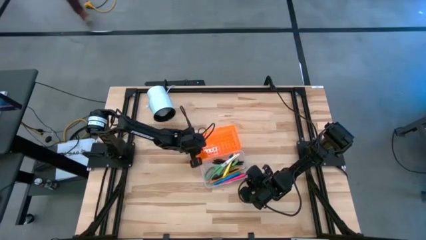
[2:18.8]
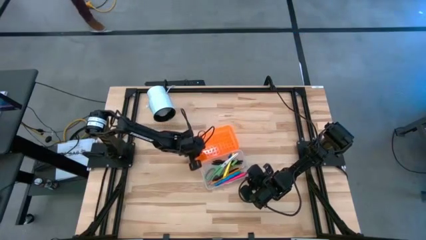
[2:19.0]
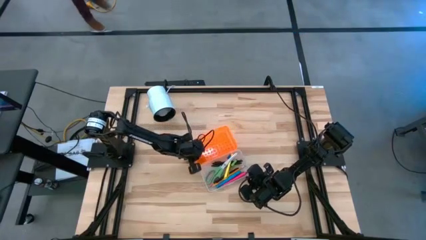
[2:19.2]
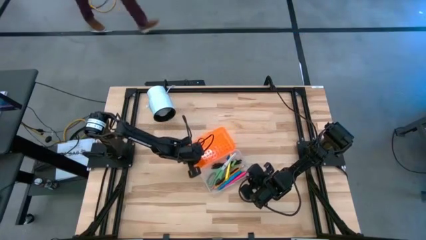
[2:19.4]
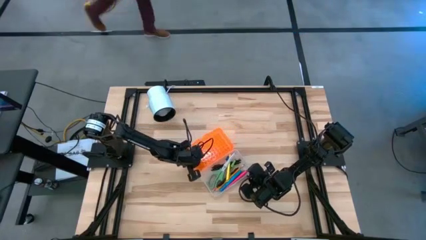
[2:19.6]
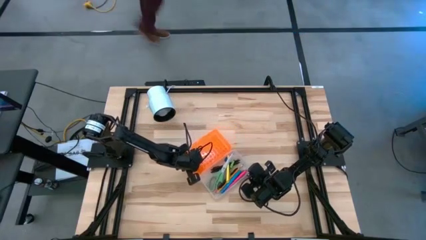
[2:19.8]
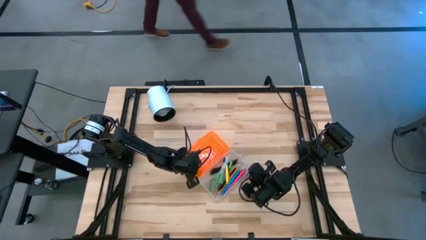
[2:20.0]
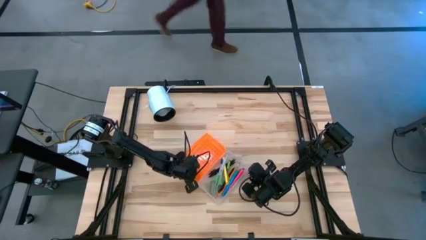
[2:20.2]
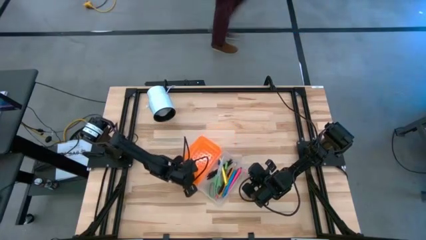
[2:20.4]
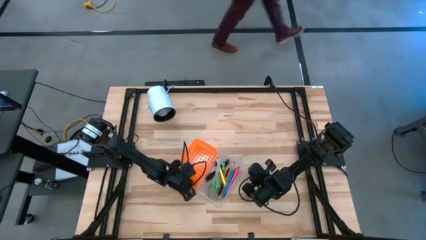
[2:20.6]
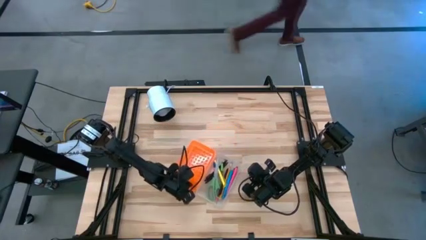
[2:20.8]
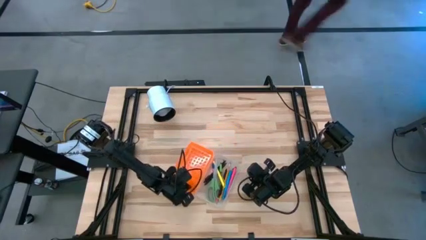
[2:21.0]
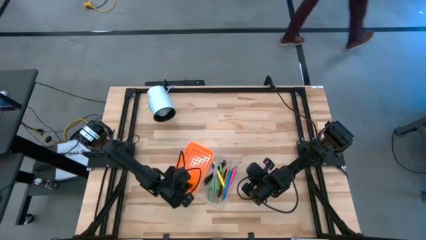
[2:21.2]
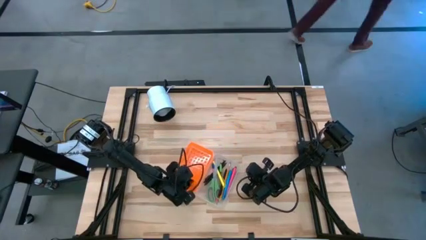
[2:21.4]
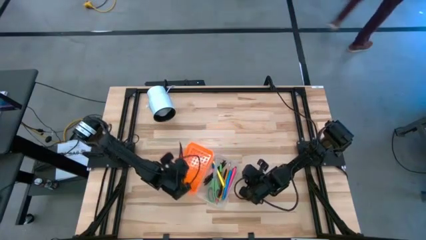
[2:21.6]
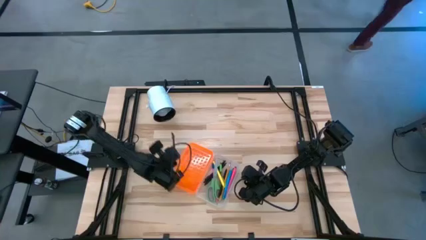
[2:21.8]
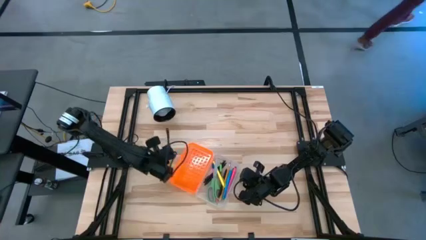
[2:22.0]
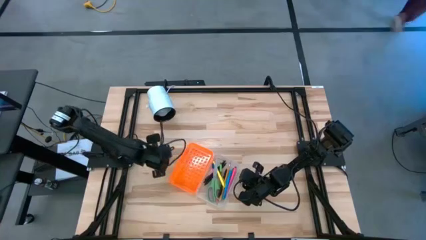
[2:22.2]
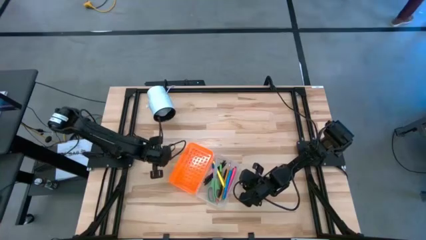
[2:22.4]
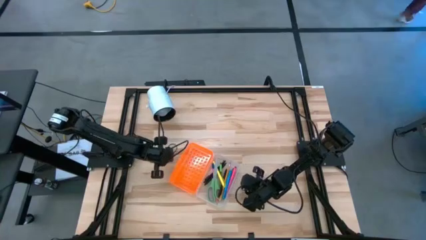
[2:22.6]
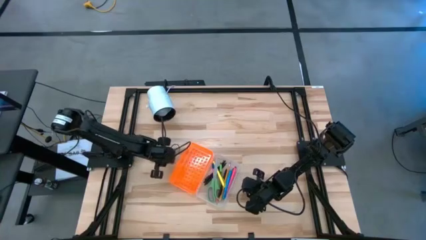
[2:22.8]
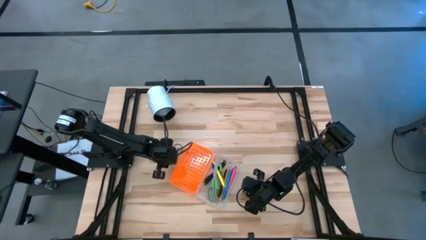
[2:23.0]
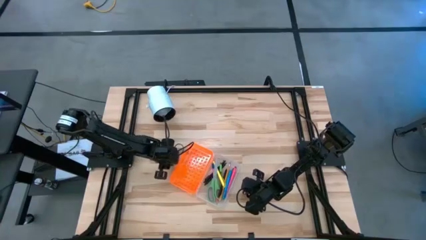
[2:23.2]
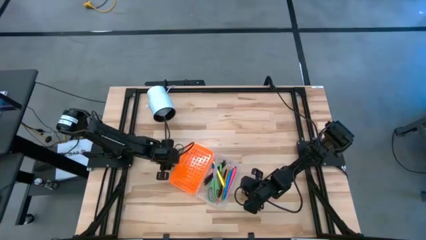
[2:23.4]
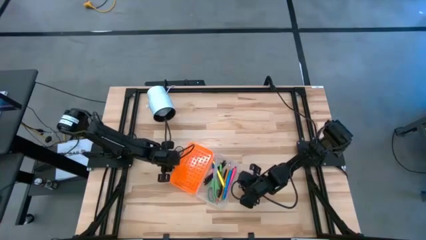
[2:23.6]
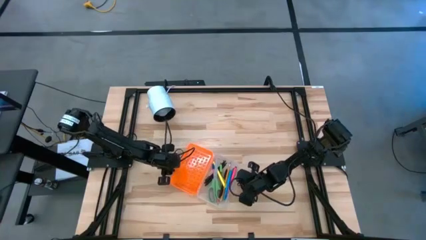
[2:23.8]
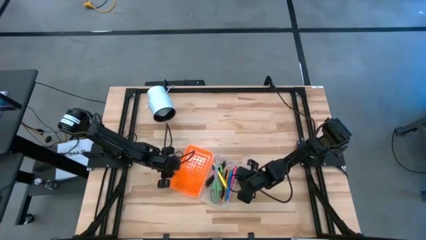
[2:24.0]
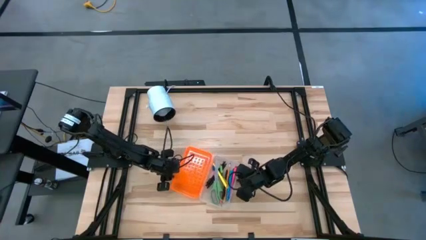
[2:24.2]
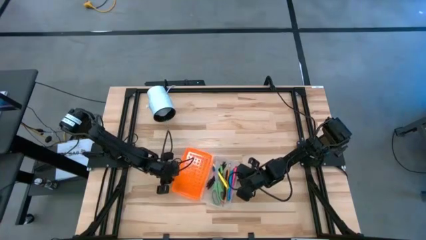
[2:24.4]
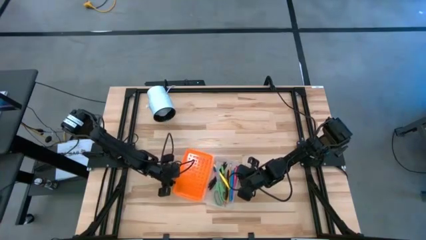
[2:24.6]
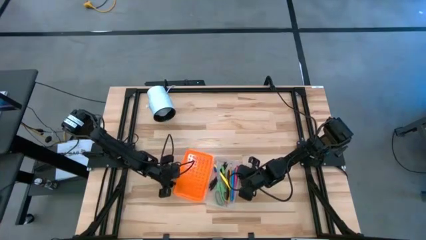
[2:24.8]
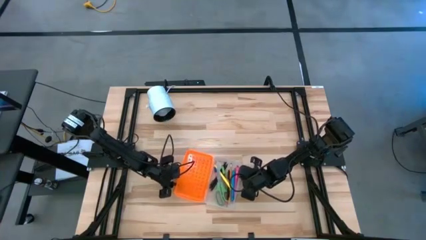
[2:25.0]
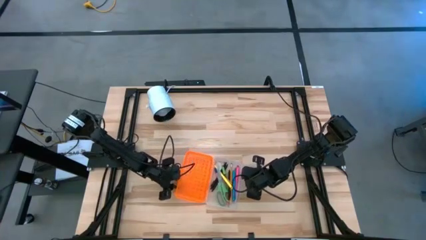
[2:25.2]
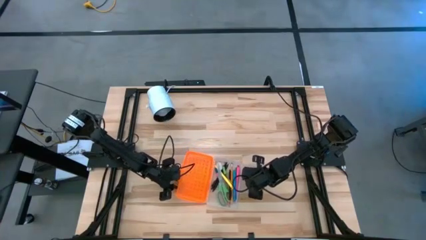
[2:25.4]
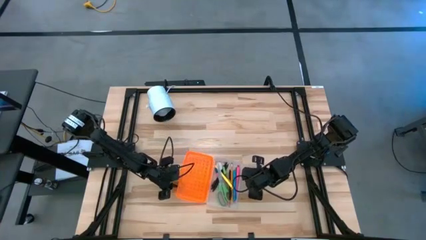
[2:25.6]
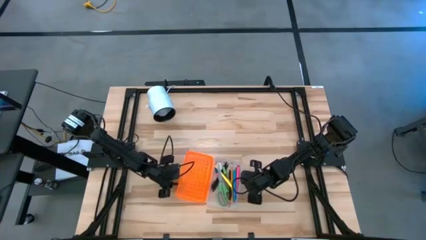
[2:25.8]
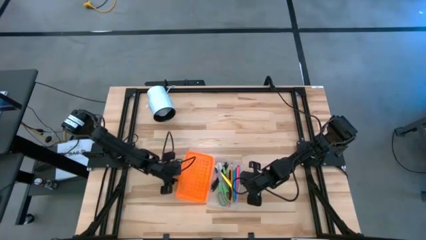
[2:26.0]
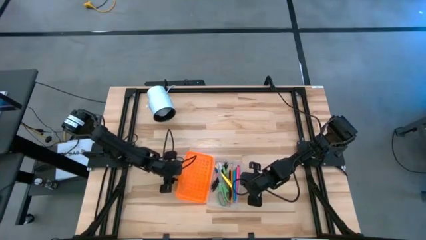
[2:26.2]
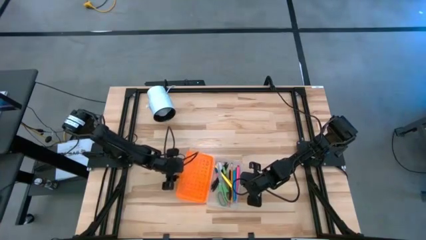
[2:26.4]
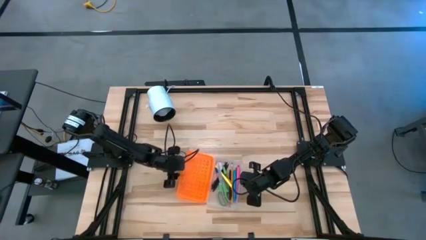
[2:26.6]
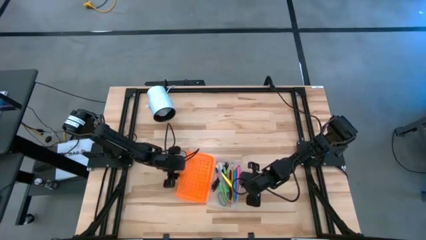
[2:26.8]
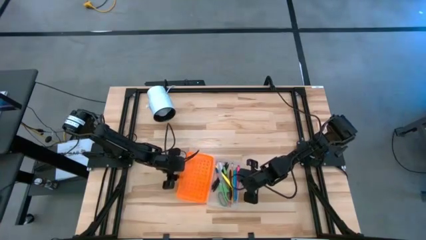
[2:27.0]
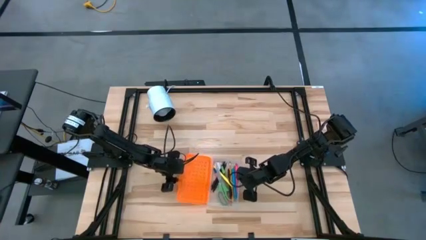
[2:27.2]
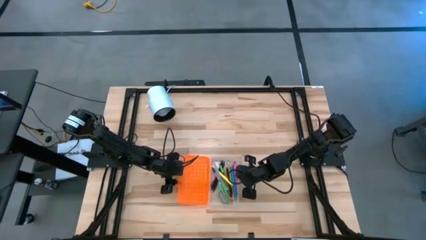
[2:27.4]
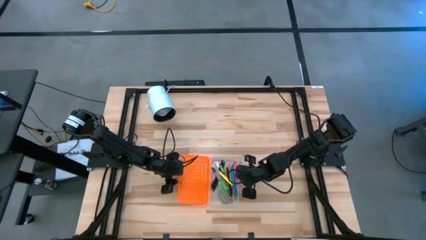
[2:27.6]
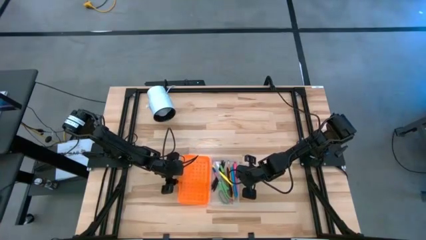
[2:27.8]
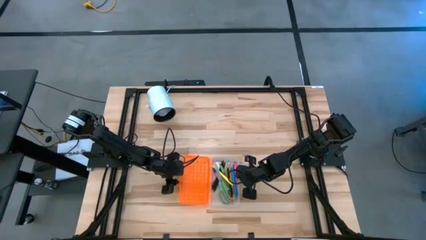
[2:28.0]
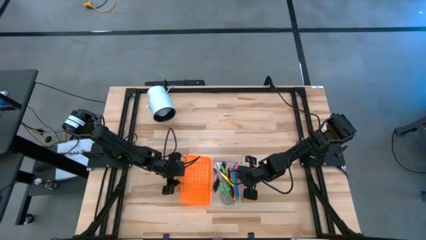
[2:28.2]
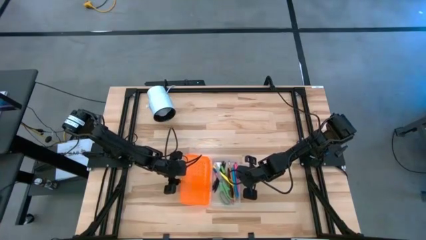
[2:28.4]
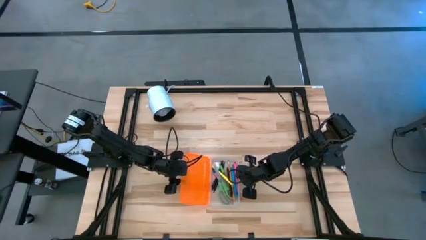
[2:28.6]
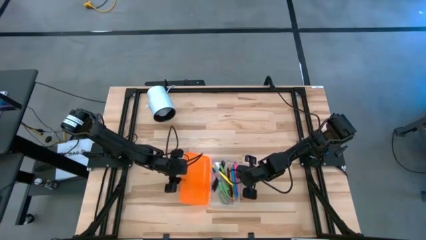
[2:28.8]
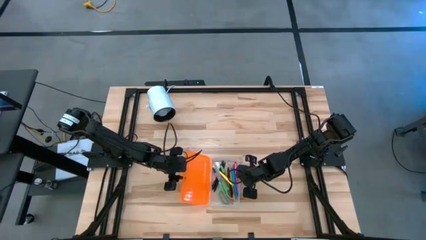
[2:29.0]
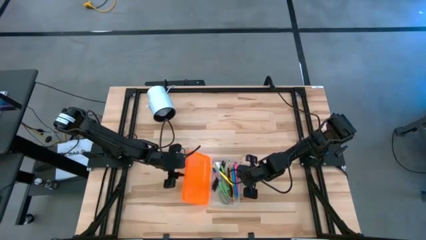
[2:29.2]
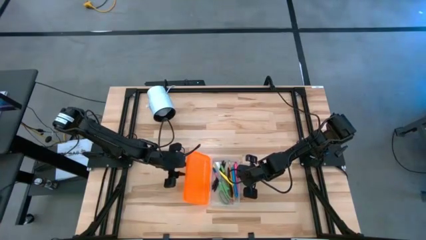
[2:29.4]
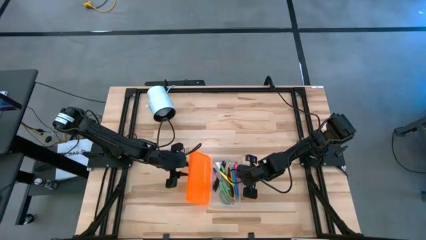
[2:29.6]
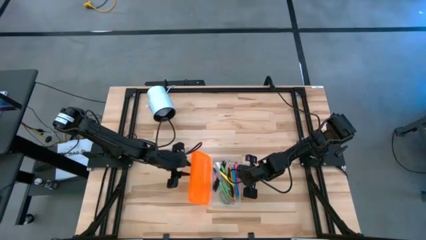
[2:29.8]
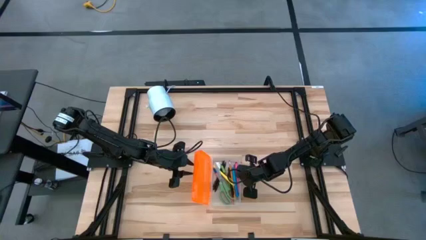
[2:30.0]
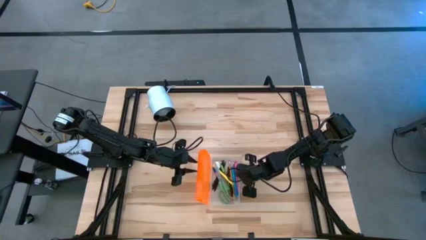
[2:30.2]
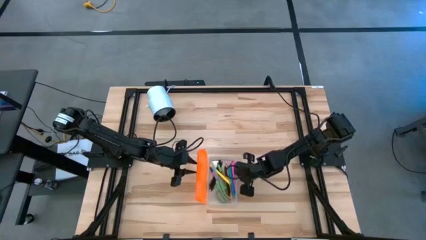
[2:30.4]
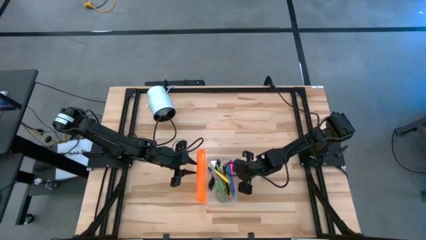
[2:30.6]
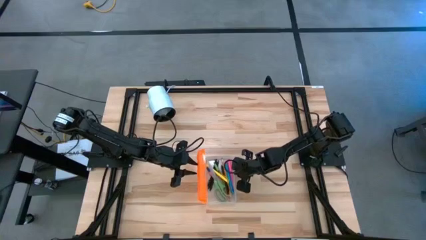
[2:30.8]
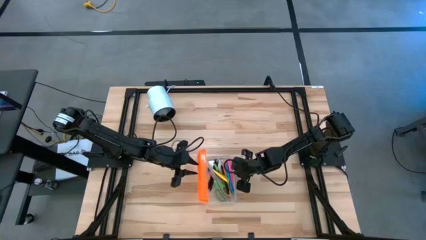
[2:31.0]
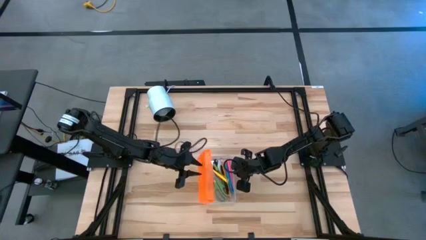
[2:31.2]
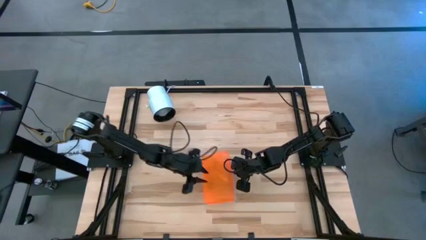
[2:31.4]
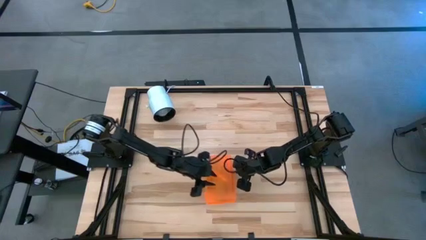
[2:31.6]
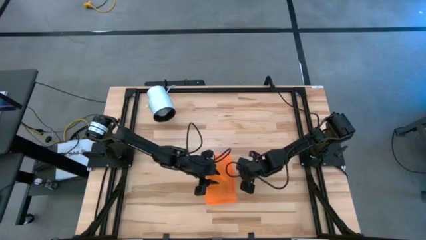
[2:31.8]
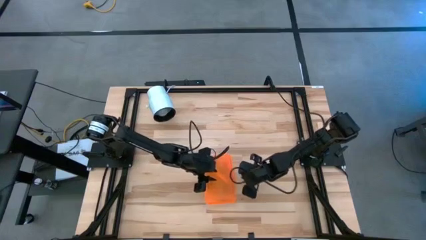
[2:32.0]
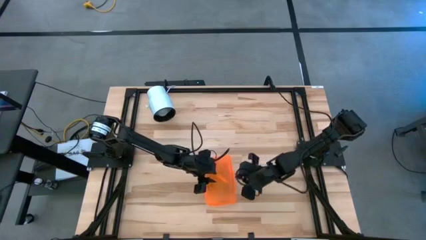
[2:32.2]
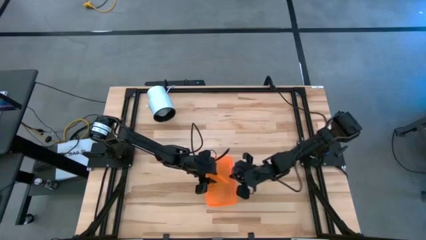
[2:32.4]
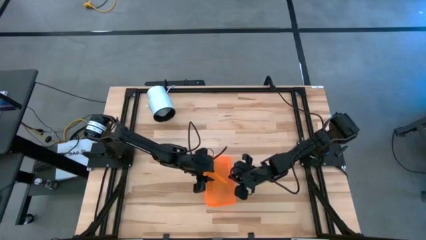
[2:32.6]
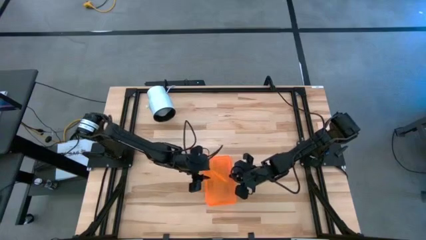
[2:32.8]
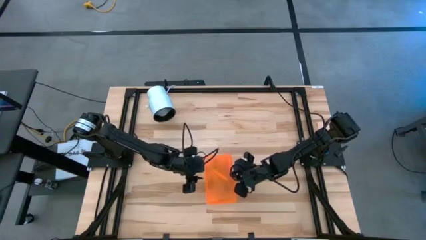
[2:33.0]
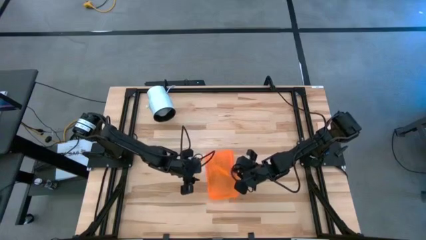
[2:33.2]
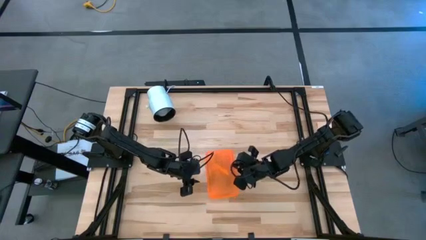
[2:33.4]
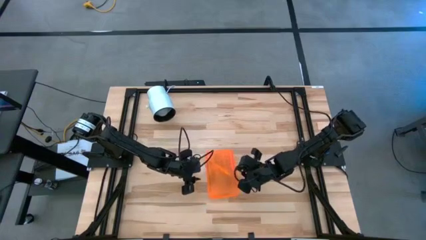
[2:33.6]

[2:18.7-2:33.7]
Task: Pick & place school supplies into a supply box
Close the orange supply box
